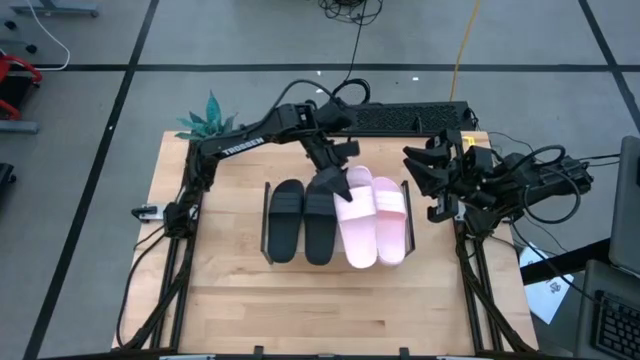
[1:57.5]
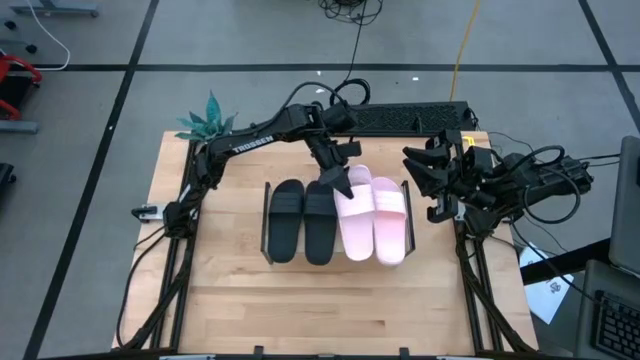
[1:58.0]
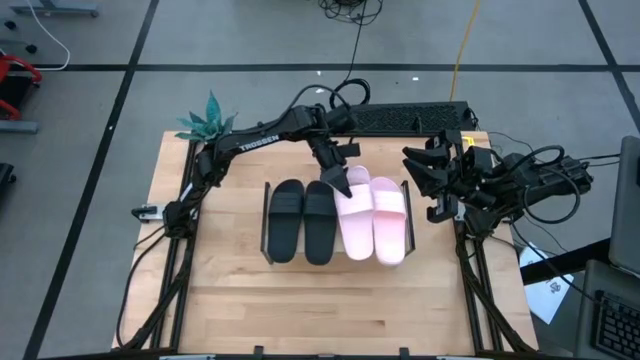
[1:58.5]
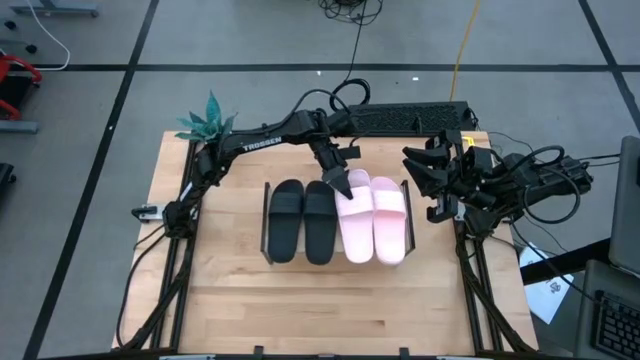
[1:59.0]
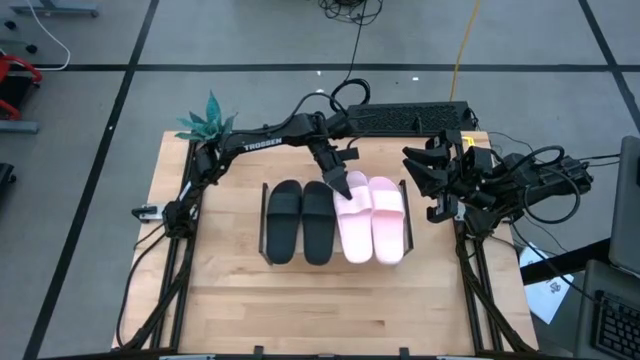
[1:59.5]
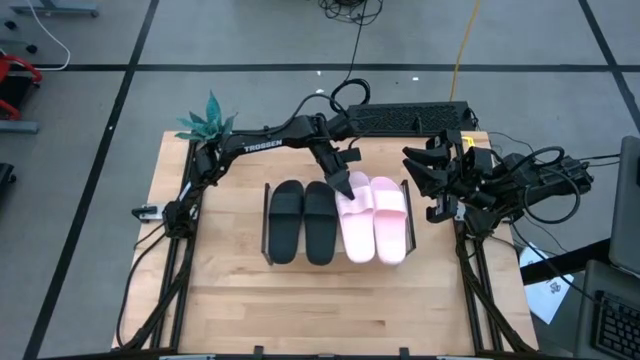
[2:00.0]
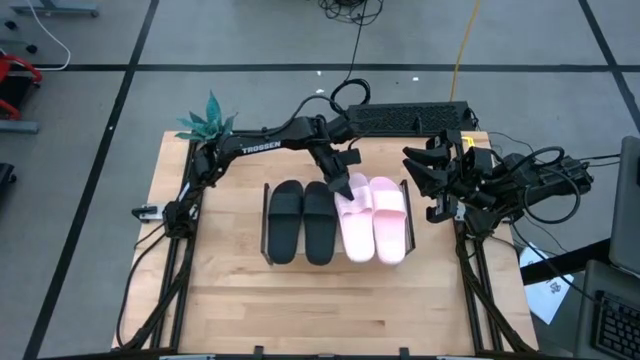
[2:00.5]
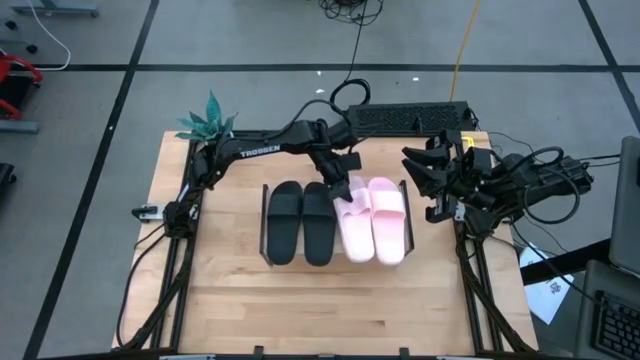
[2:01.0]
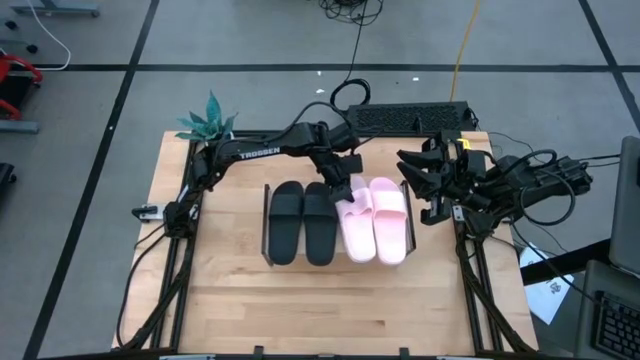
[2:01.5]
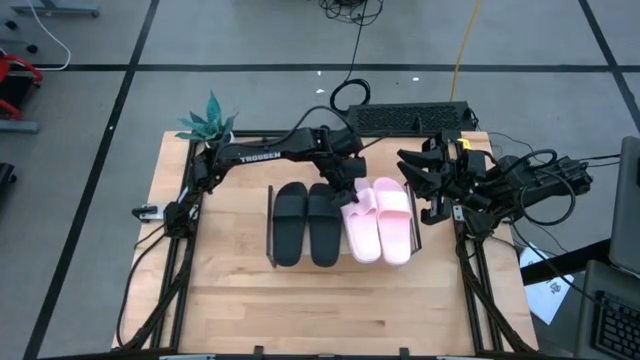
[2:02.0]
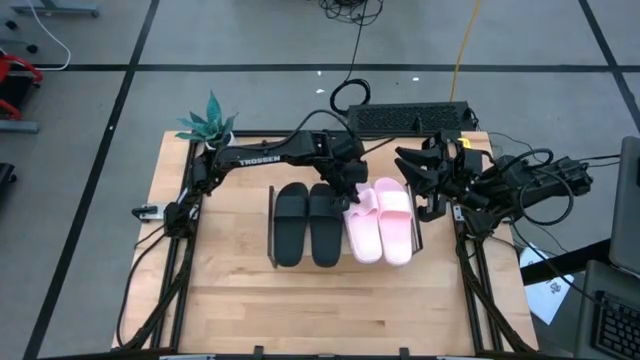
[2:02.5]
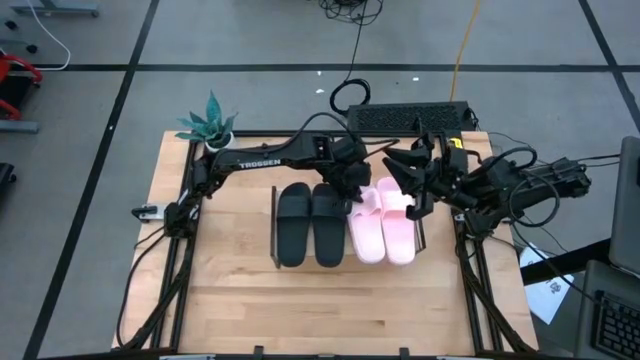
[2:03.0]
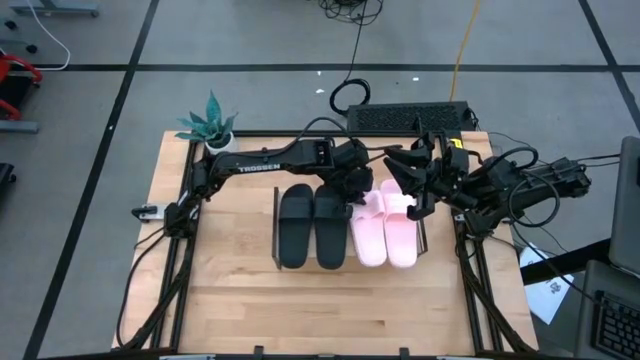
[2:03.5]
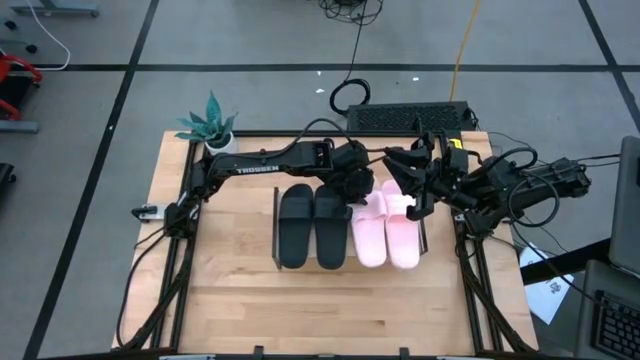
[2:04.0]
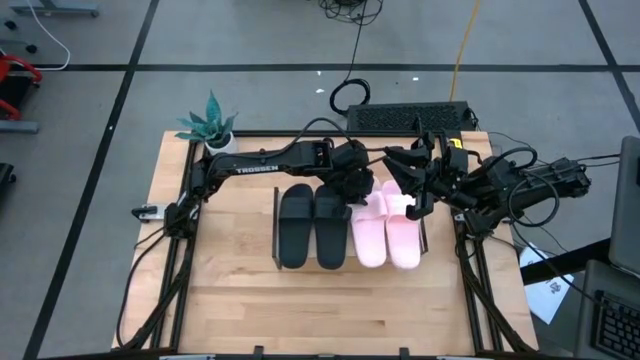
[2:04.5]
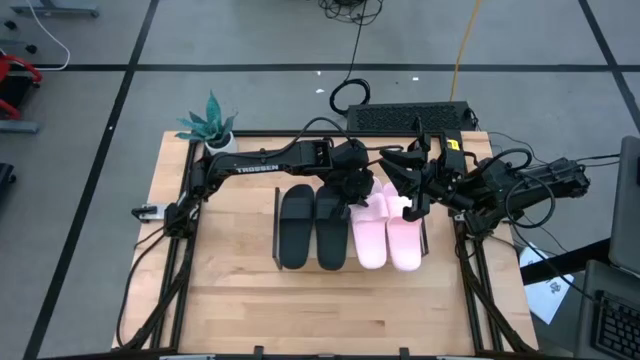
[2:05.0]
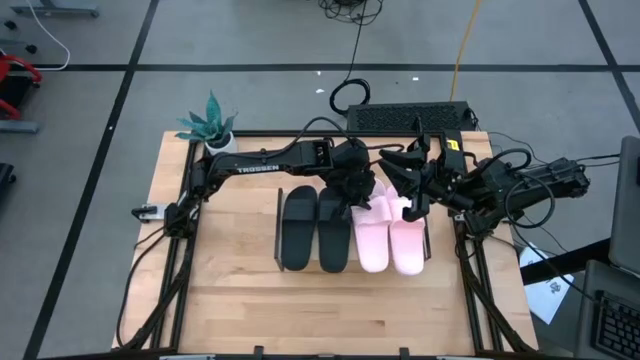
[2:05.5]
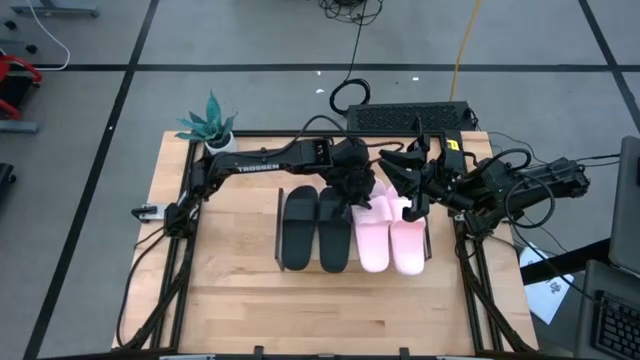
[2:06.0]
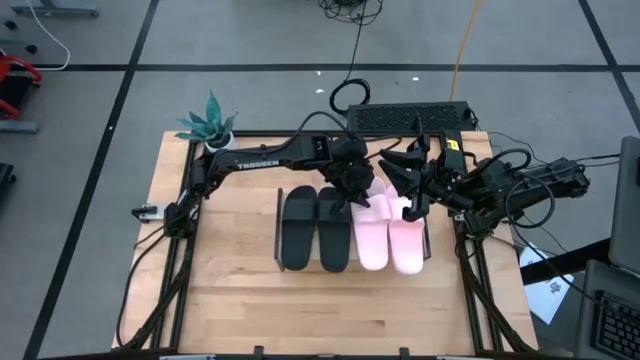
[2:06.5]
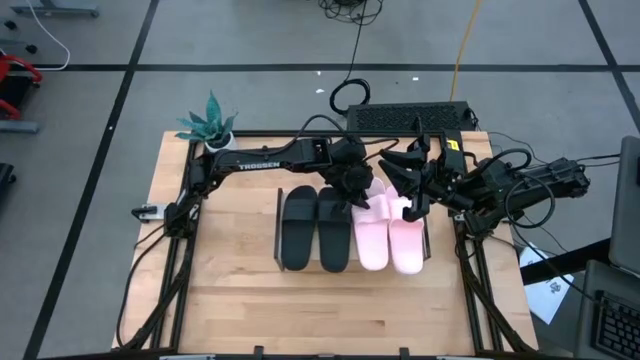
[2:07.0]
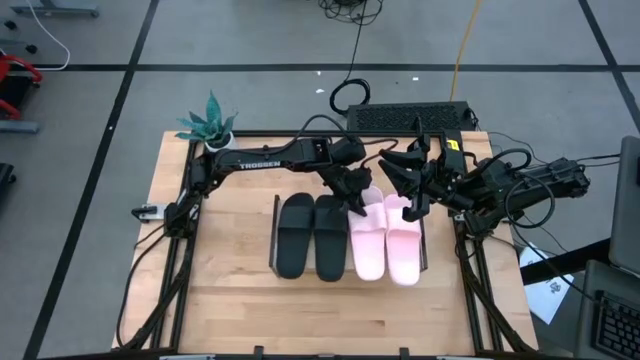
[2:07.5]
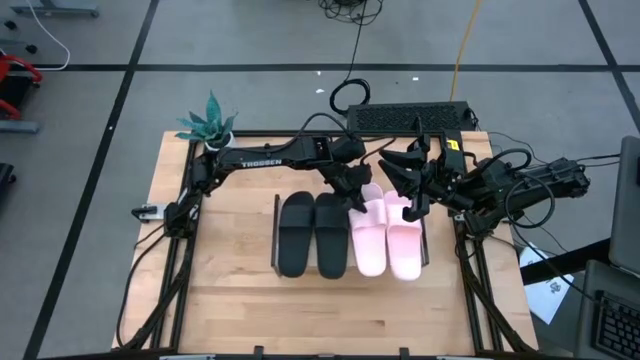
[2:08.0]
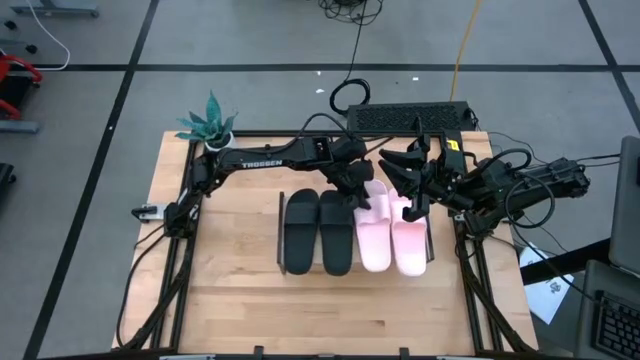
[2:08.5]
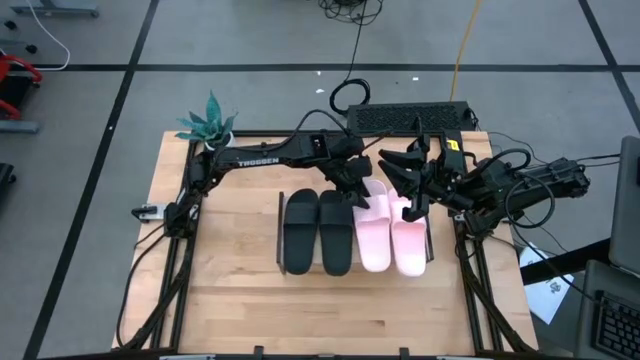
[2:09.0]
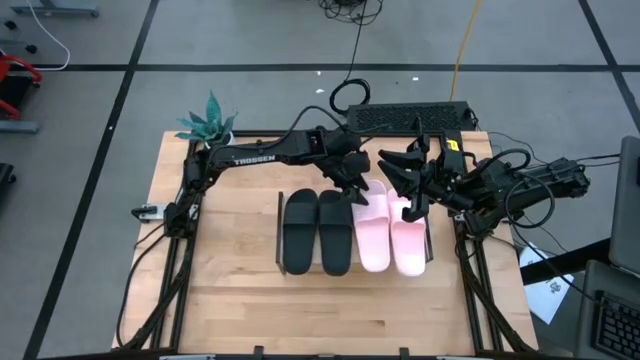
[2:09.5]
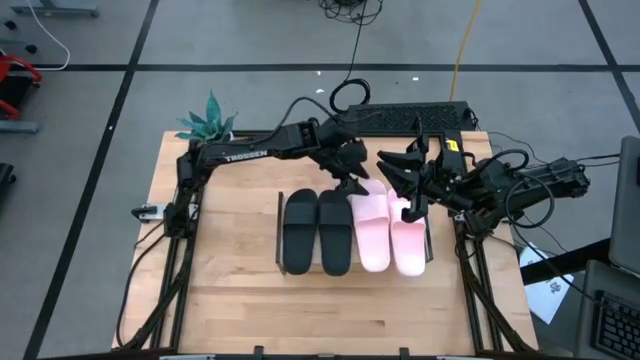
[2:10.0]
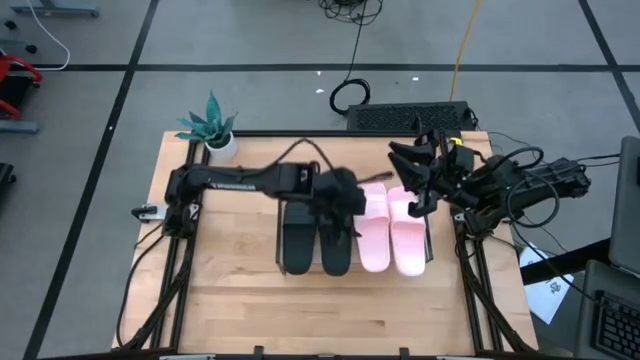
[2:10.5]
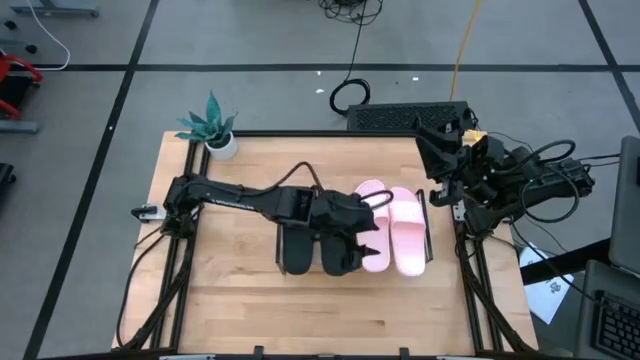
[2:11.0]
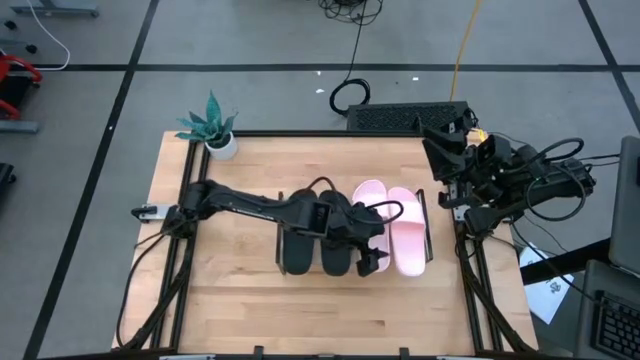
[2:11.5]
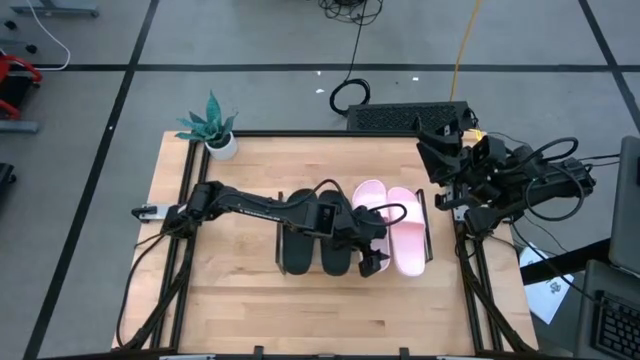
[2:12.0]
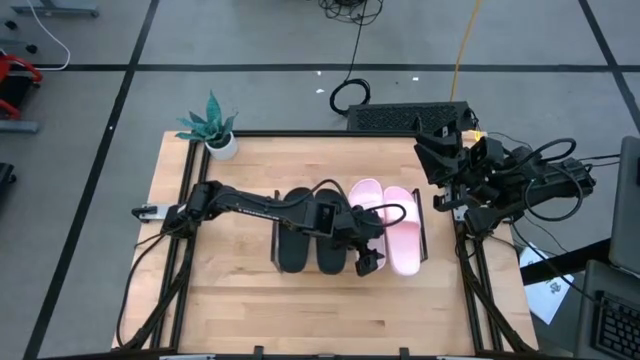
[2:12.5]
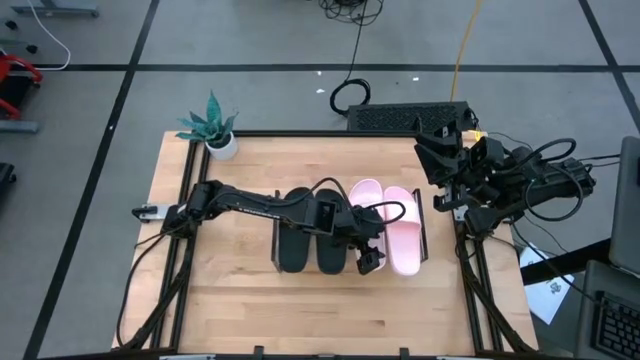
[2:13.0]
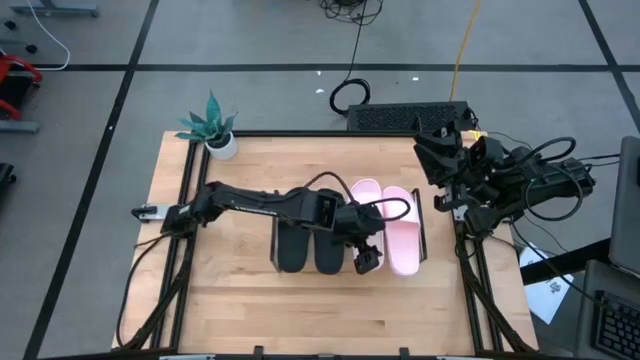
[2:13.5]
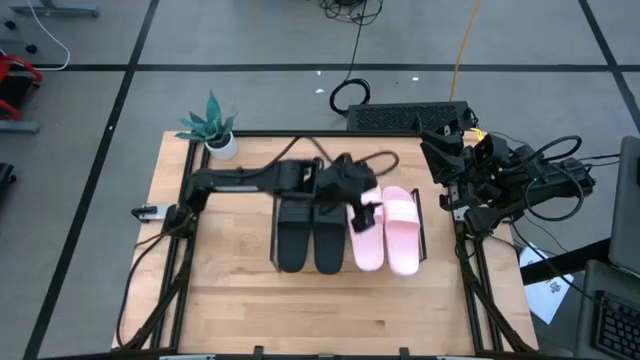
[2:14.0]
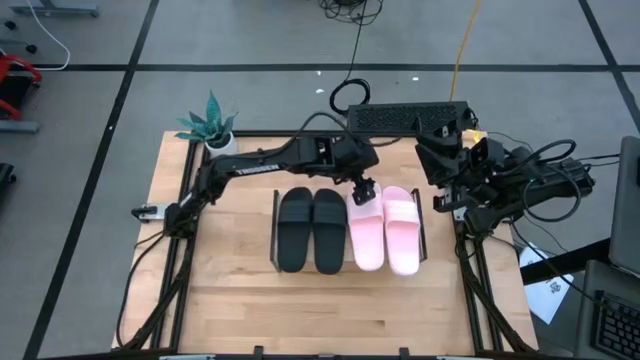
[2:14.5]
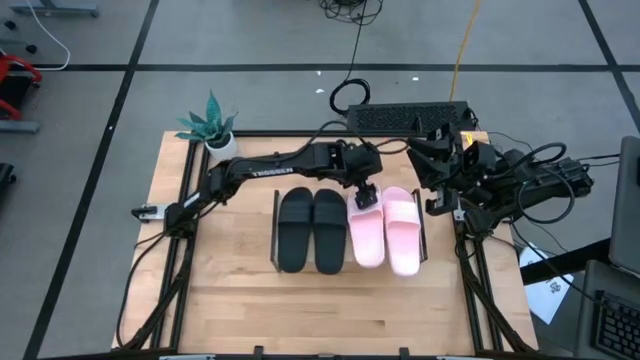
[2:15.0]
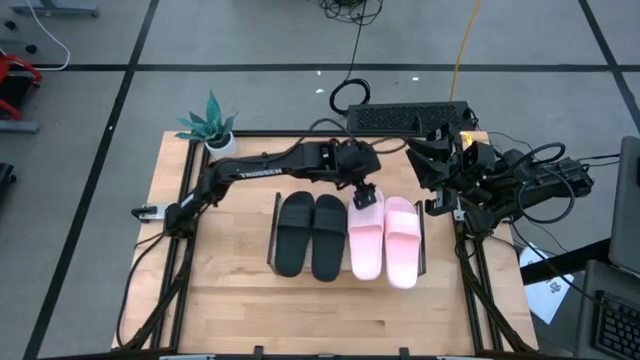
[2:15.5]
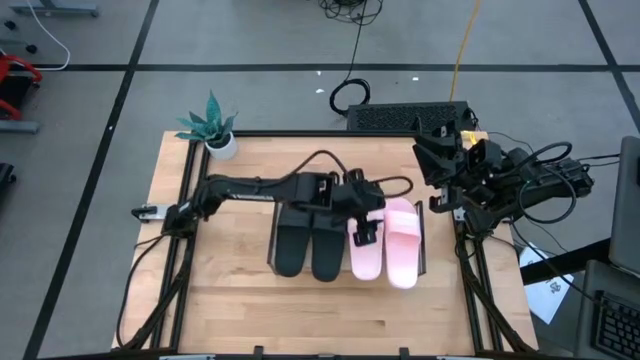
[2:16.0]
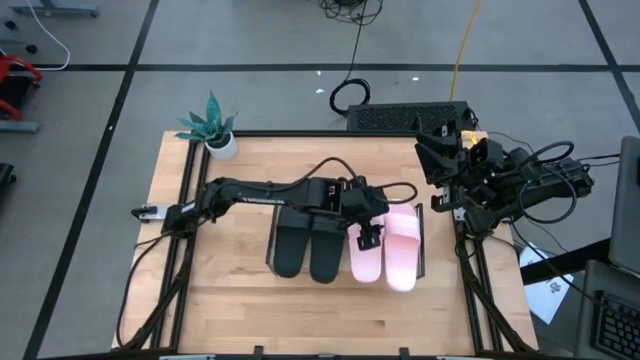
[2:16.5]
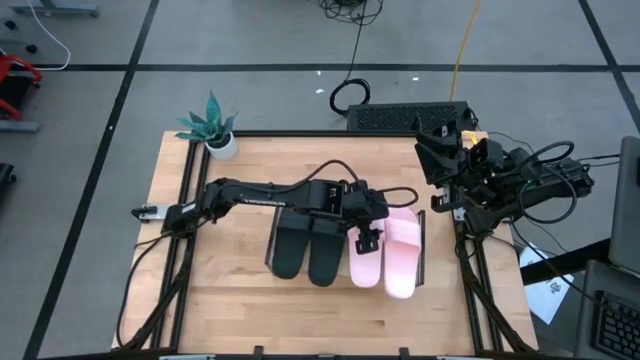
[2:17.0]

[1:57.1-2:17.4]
Task: Pick and place slides into the shelf
Put the pink slipper on the shelf

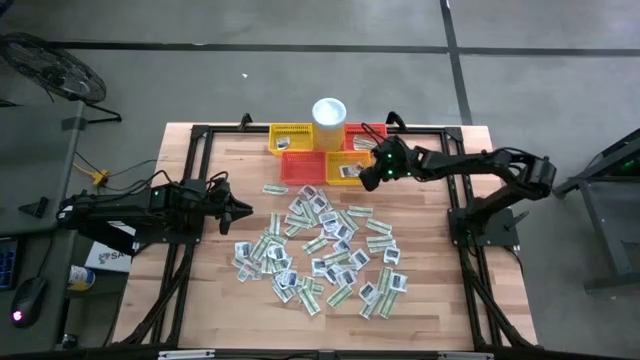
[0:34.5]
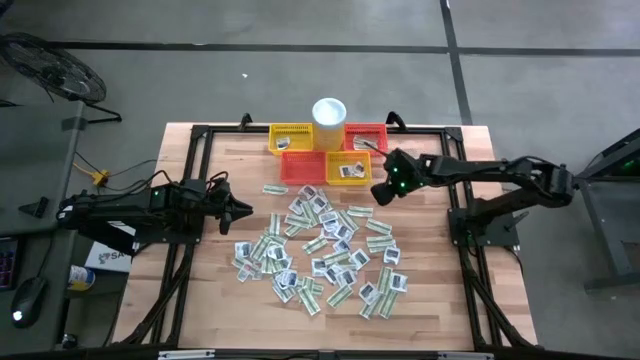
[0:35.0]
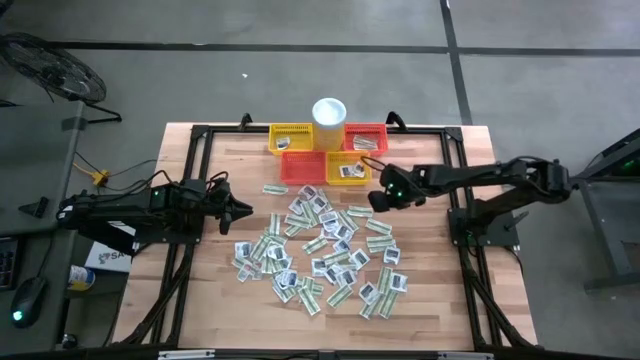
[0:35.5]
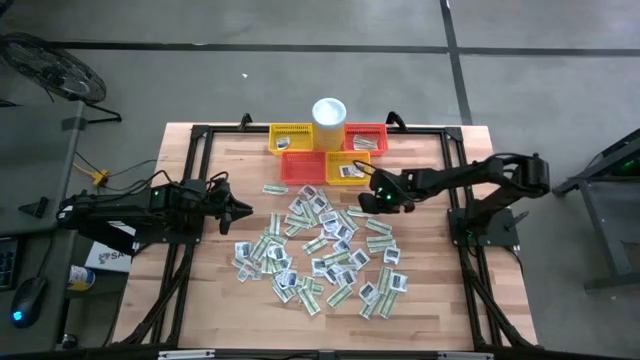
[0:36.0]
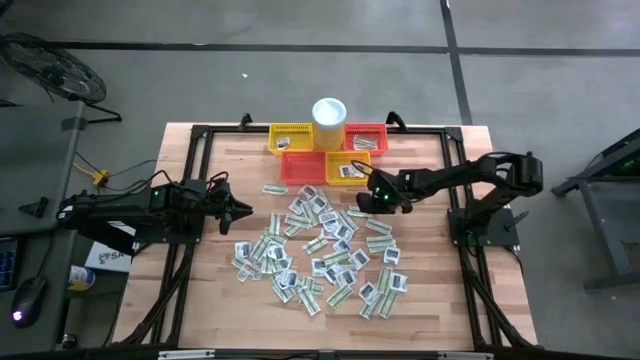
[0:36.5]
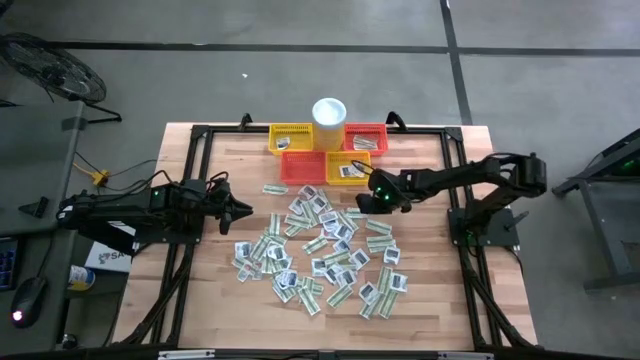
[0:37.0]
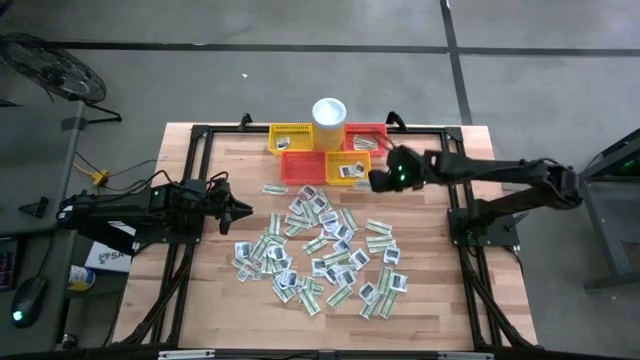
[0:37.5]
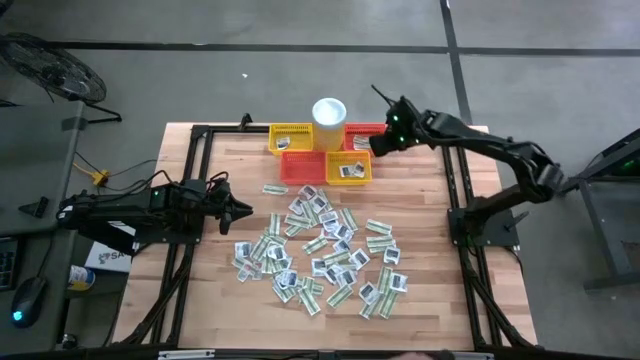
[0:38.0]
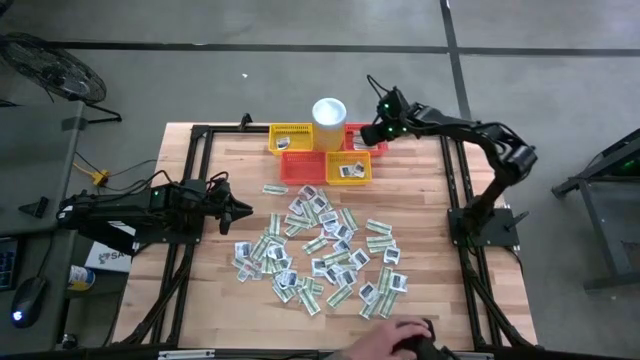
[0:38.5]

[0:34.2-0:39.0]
Task: Pick & Place First Aid Supplies
Put the green bandage pack into the top orange basket
